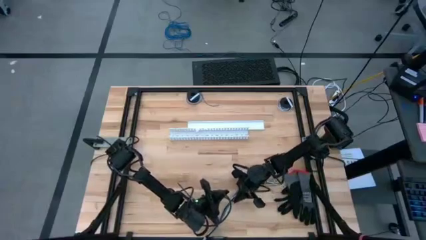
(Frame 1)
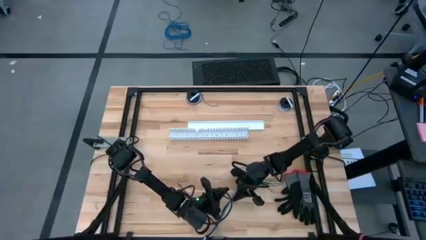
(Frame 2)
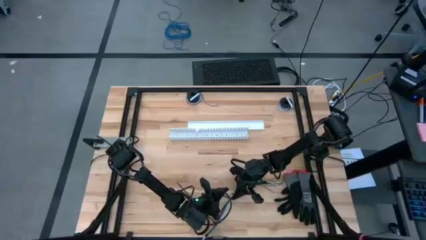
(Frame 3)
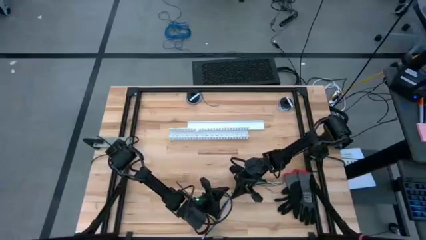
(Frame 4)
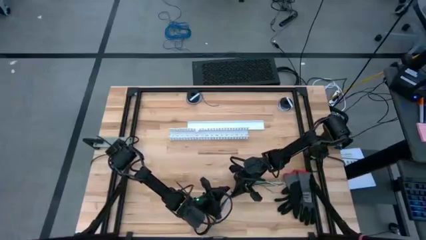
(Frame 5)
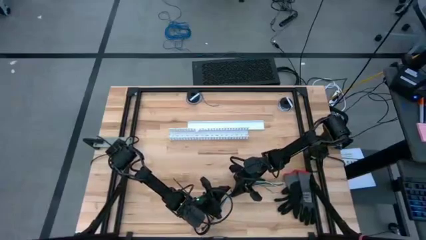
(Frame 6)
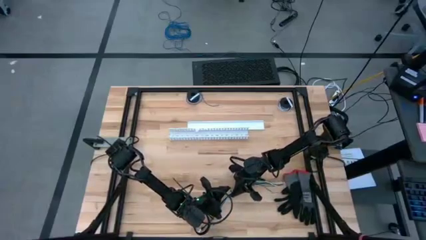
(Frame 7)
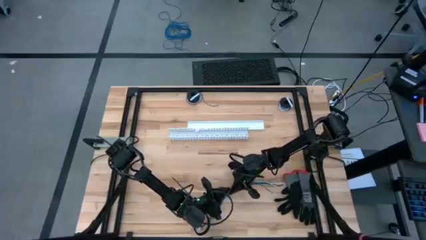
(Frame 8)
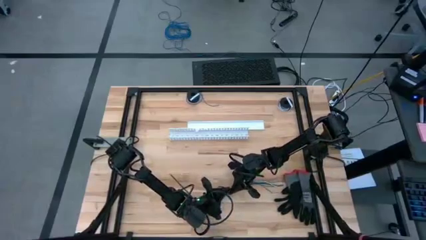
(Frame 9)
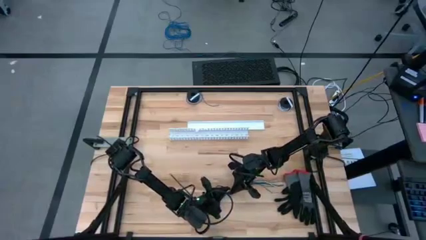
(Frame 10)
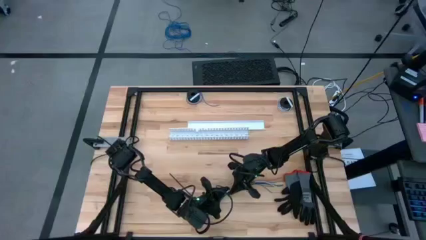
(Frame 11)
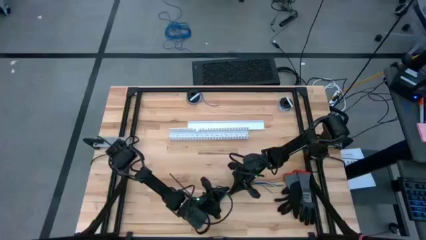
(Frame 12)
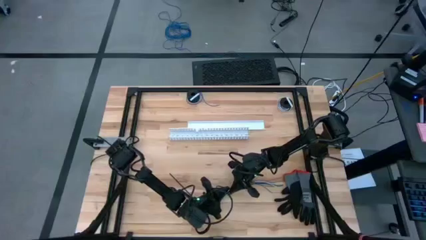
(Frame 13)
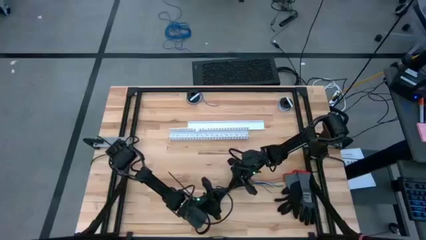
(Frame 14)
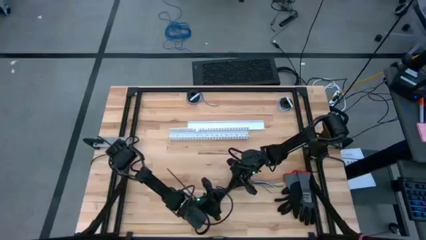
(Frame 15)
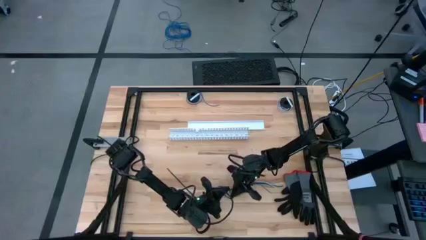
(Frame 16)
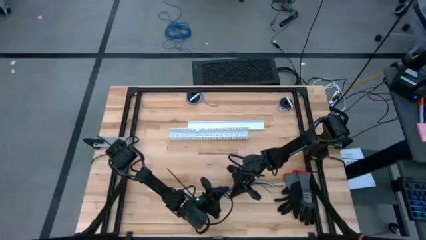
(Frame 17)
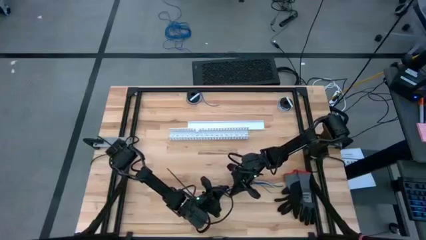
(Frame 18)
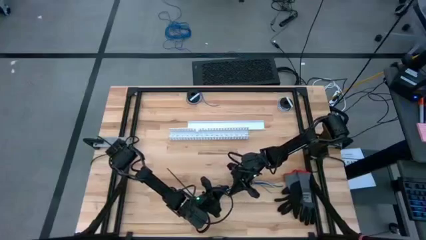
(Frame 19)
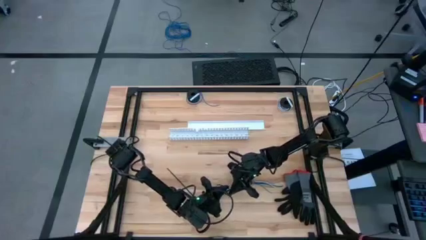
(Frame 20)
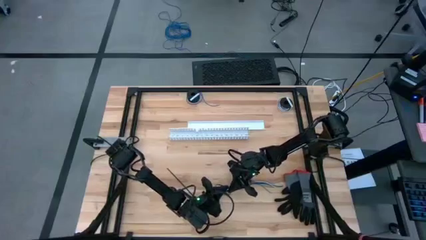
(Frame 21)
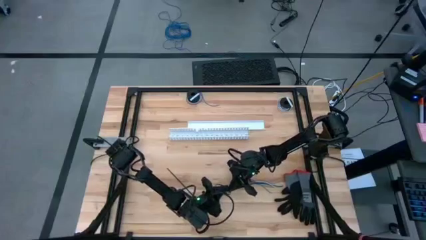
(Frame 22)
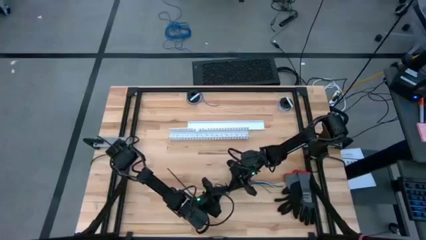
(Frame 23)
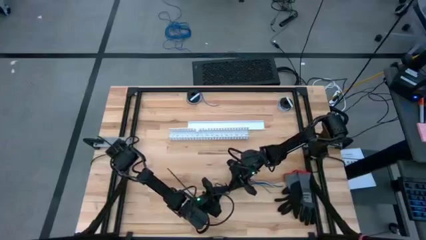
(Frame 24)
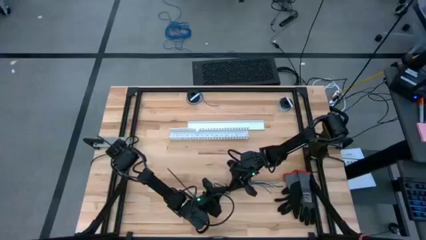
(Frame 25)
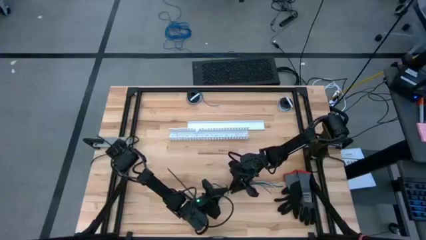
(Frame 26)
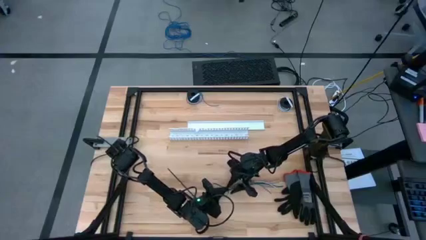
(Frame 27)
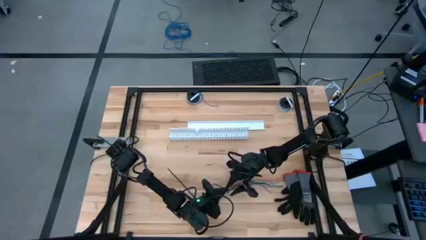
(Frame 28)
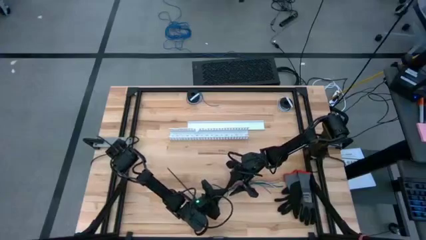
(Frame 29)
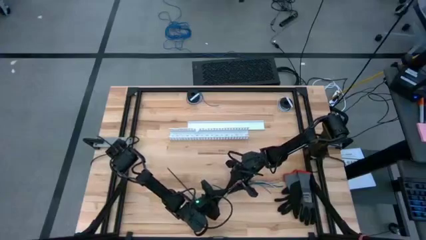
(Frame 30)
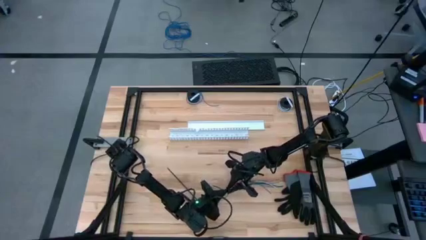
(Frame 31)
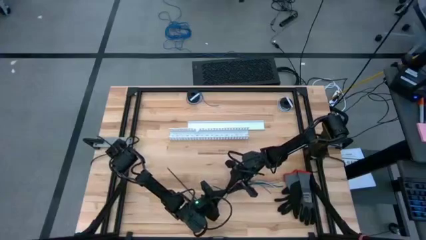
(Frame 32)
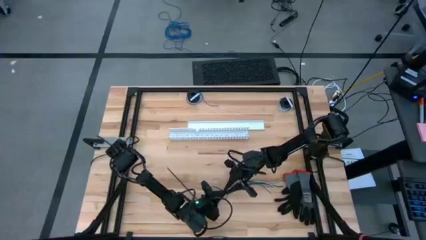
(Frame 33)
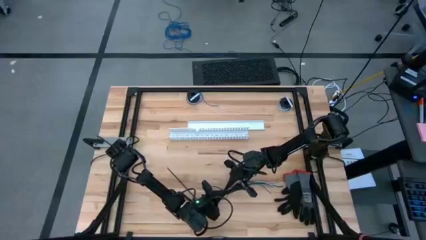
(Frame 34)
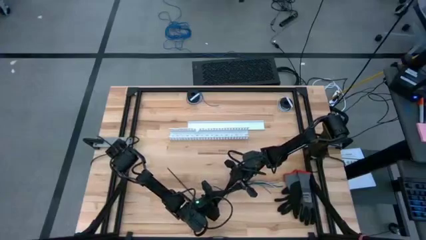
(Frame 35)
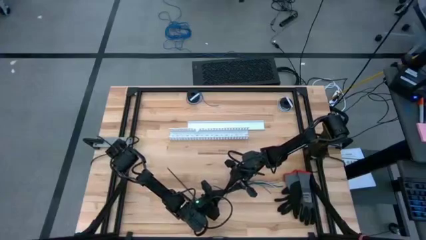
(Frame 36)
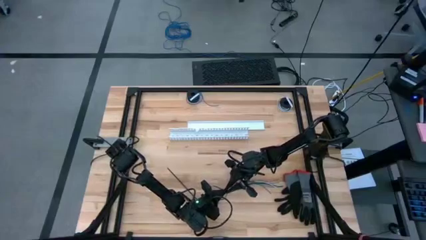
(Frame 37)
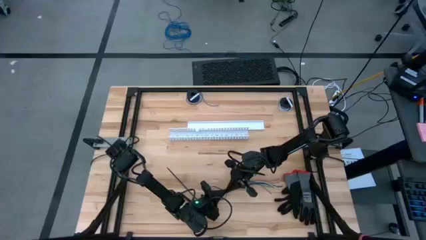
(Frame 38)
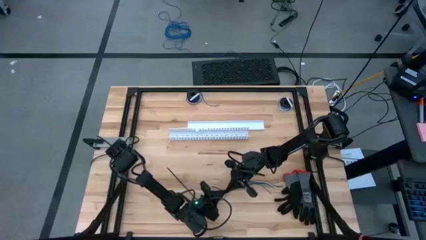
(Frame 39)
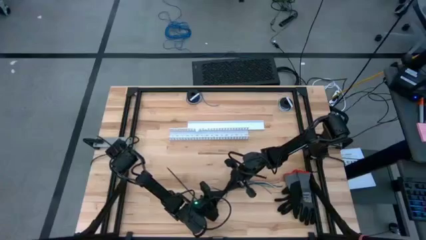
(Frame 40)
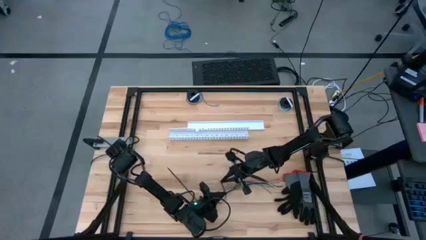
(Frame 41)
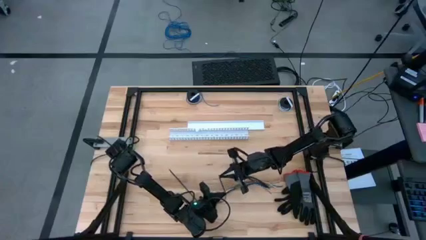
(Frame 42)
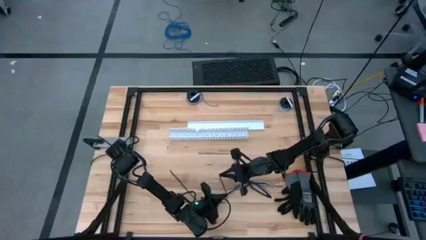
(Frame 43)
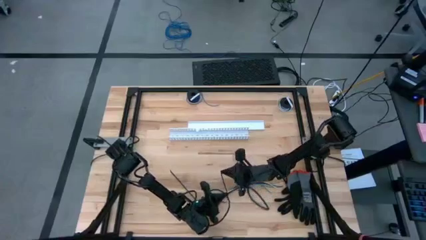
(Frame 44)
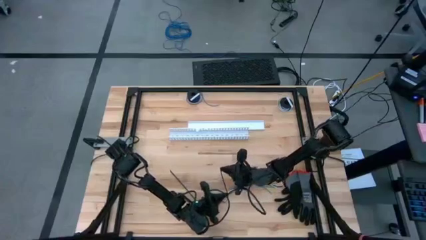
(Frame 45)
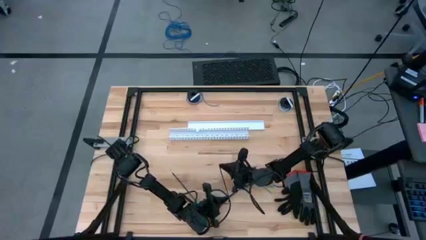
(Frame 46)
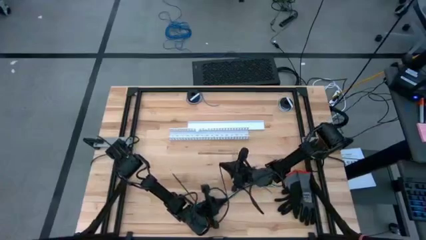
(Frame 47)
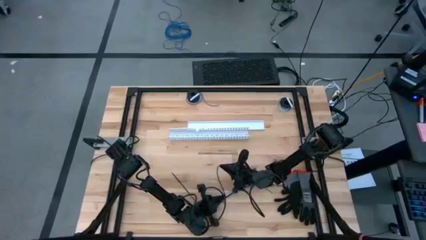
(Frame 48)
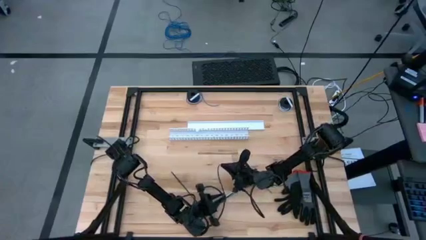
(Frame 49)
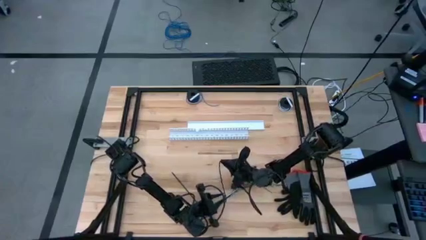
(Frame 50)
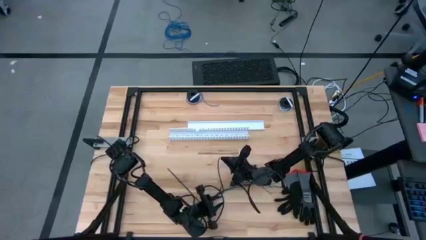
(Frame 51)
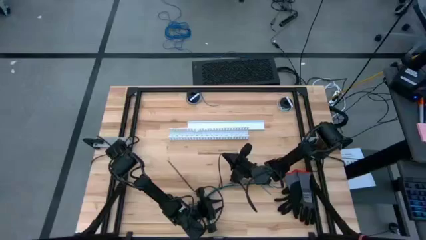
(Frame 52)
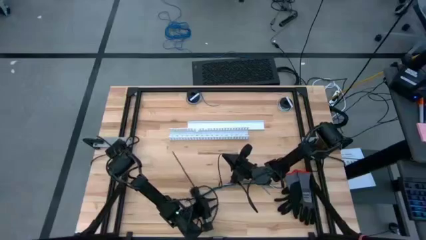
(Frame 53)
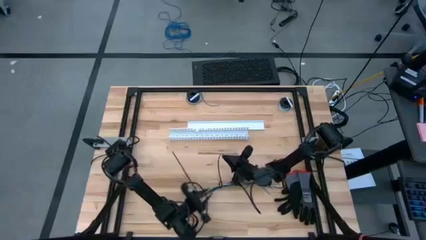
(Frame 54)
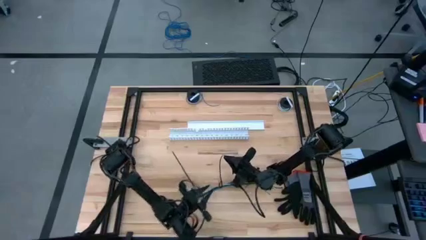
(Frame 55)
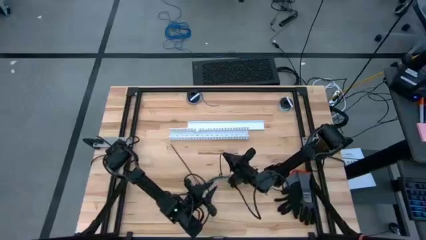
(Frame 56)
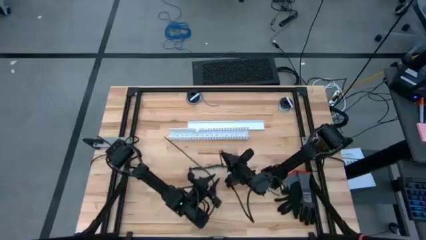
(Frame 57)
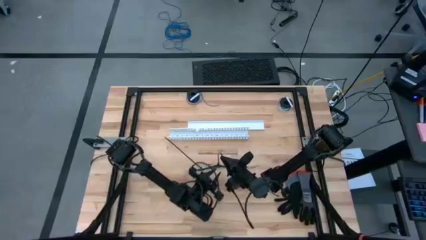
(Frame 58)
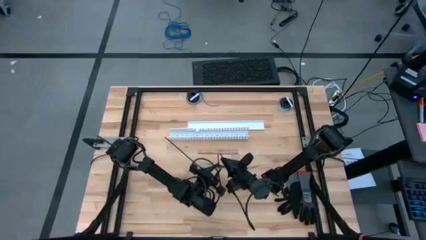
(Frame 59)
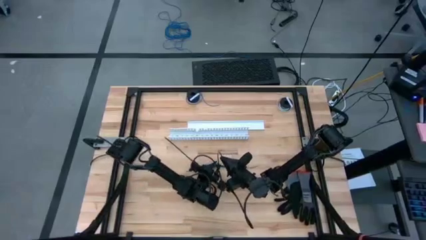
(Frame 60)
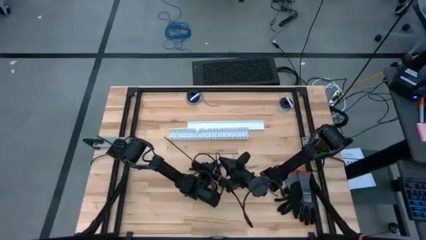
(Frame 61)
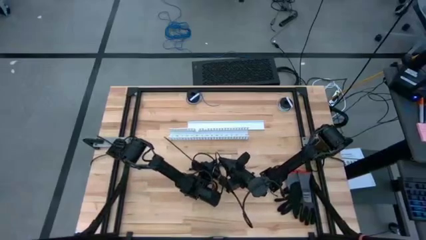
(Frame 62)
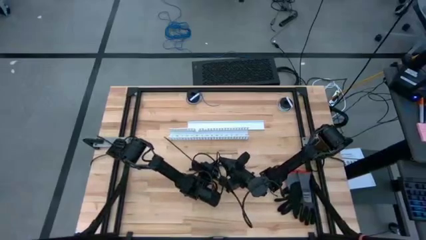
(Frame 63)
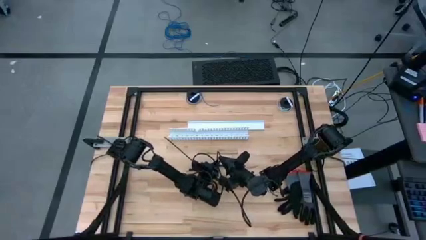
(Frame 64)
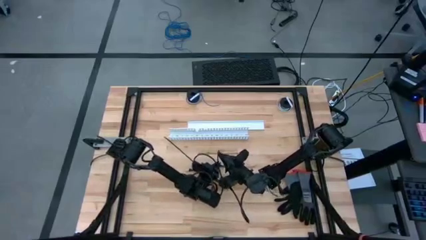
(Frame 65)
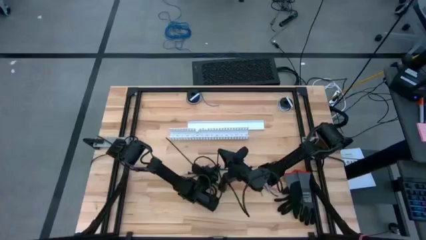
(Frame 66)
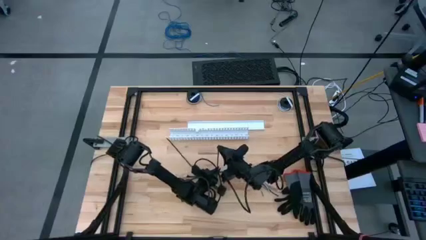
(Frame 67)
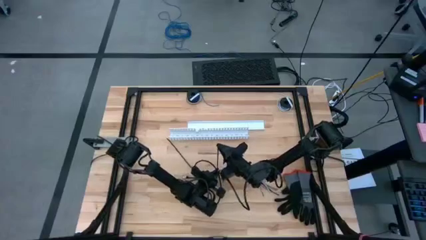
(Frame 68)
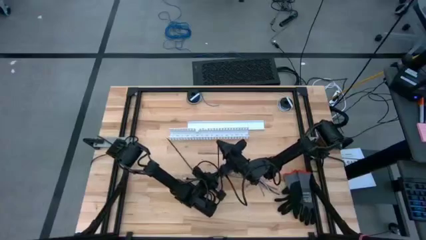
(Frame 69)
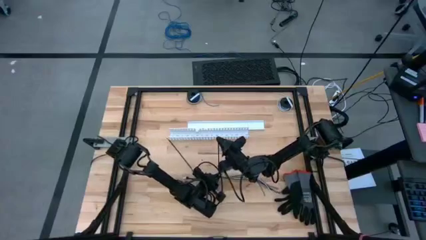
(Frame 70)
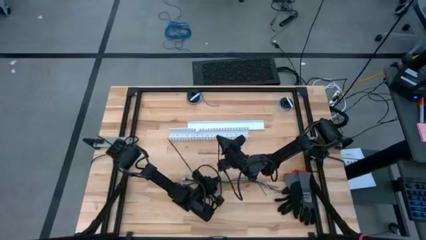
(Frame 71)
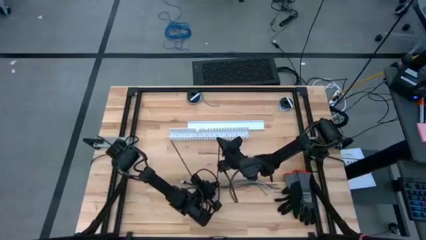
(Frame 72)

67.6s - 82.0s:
Task: Ziptie cables
Assemble the cable wires with the second cable zip tie
